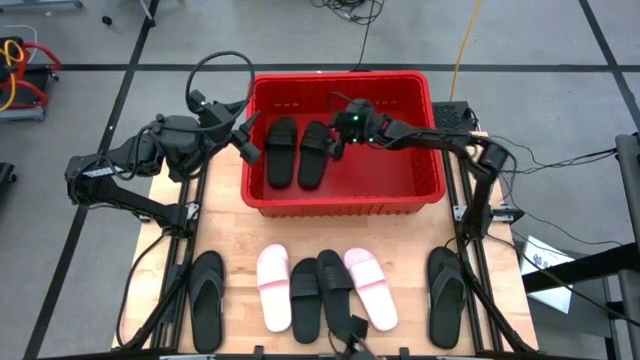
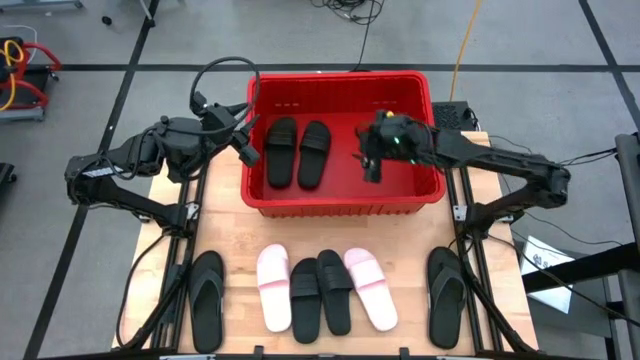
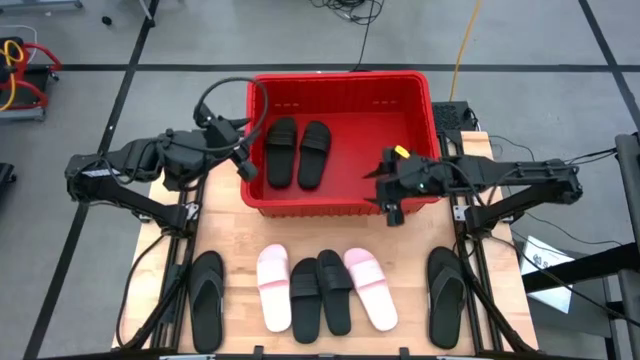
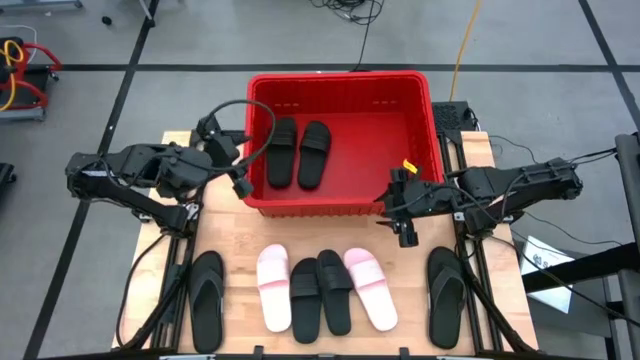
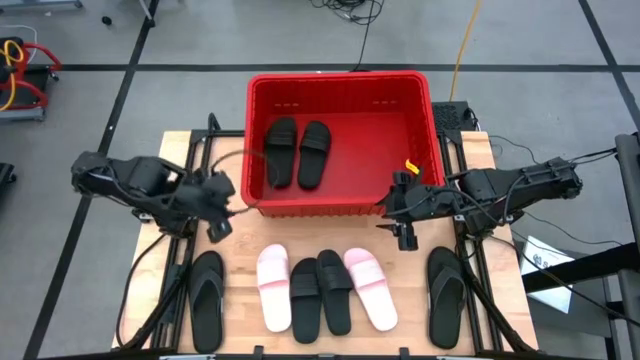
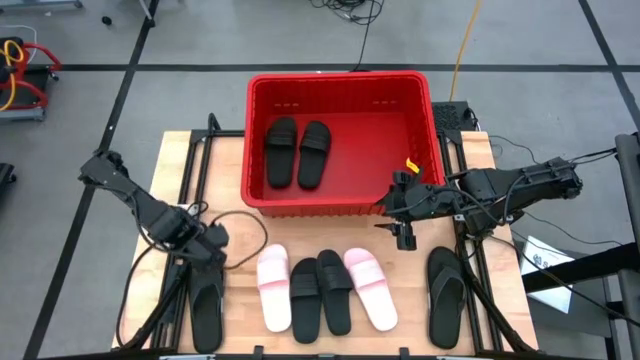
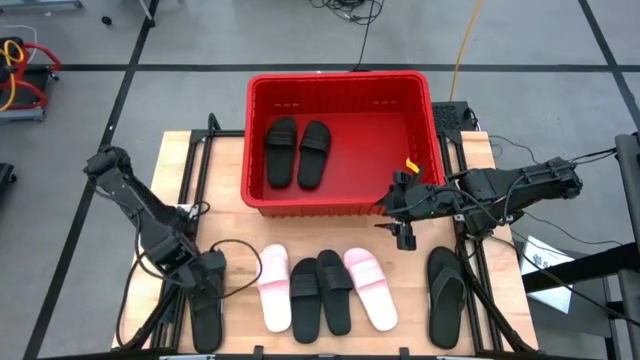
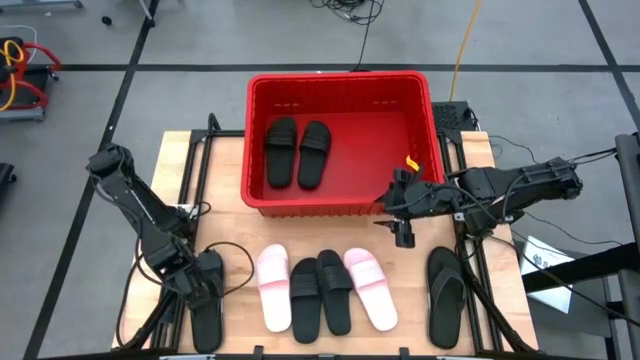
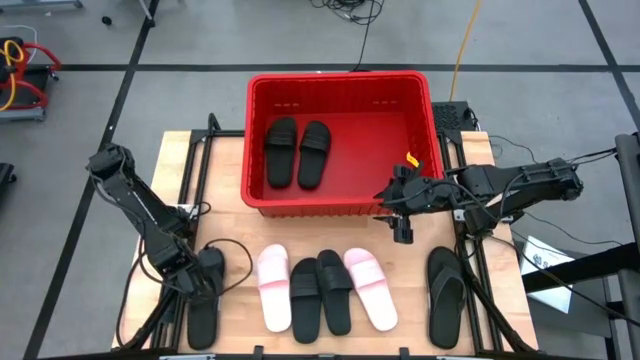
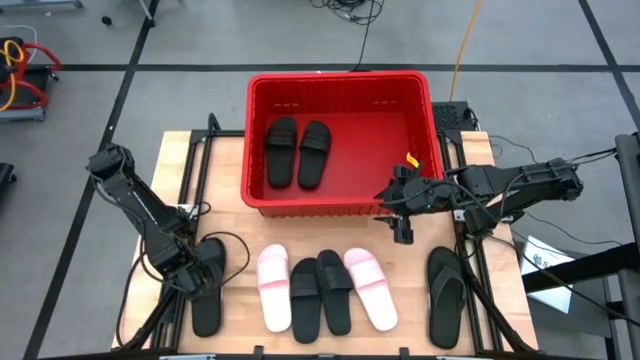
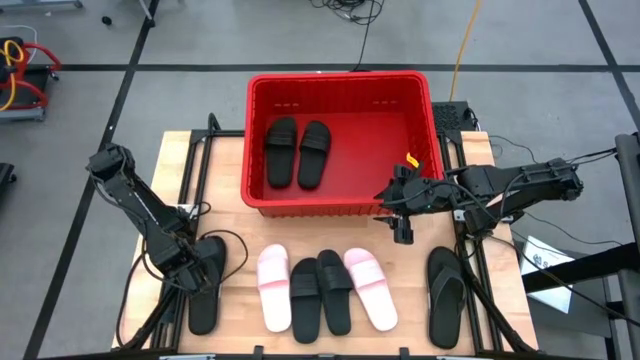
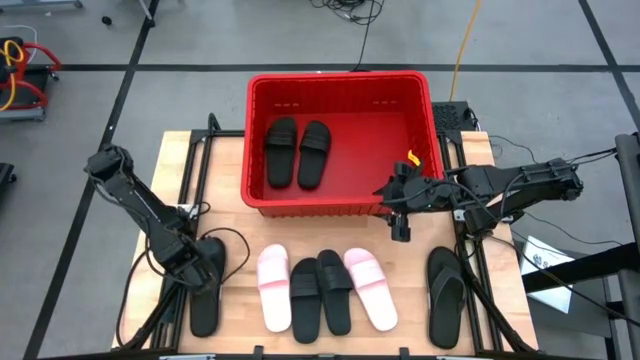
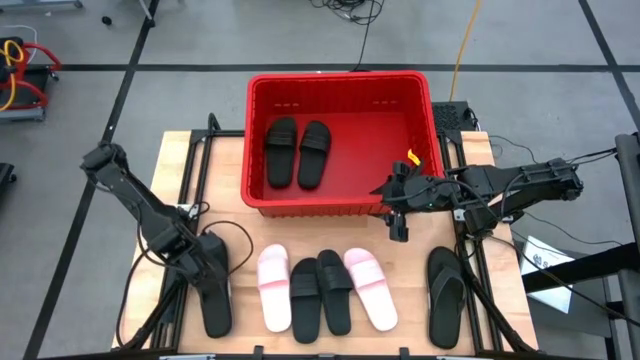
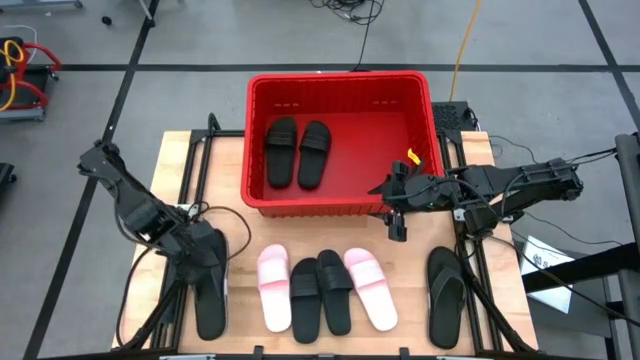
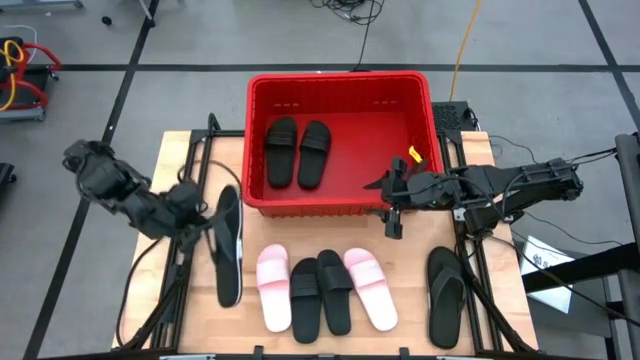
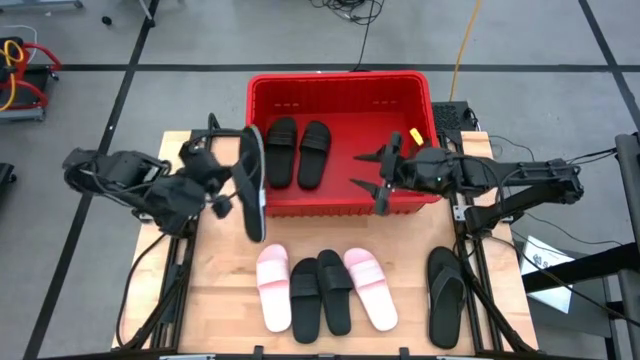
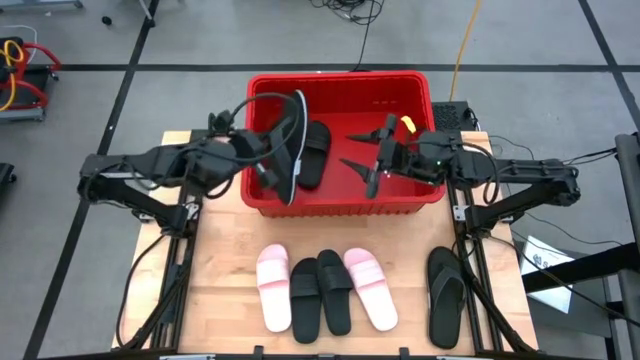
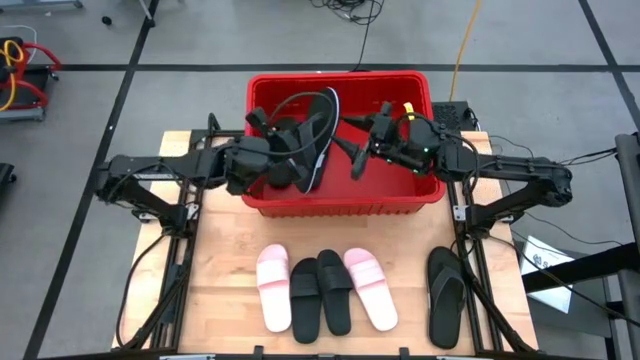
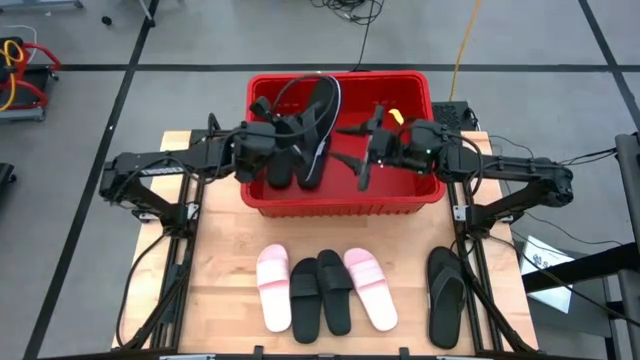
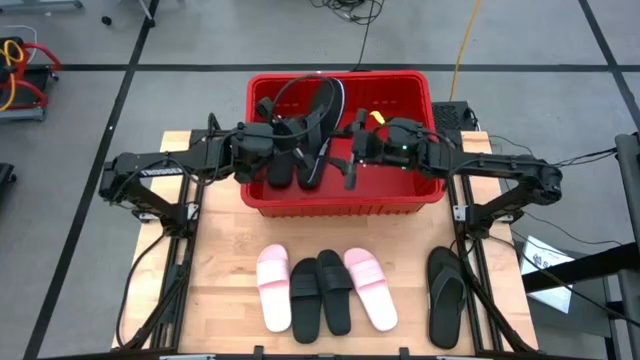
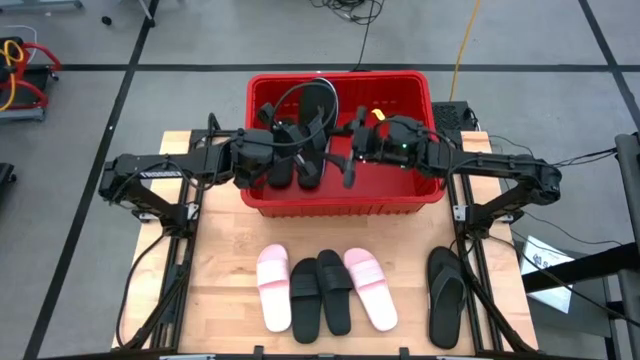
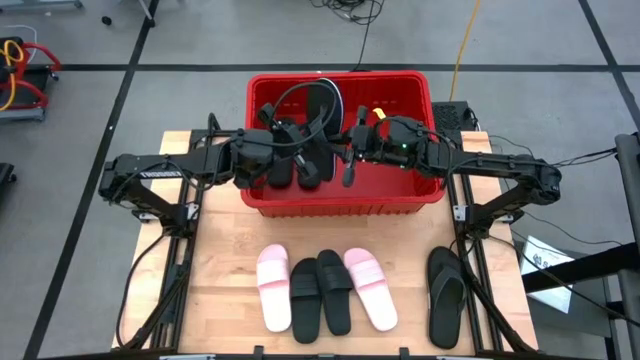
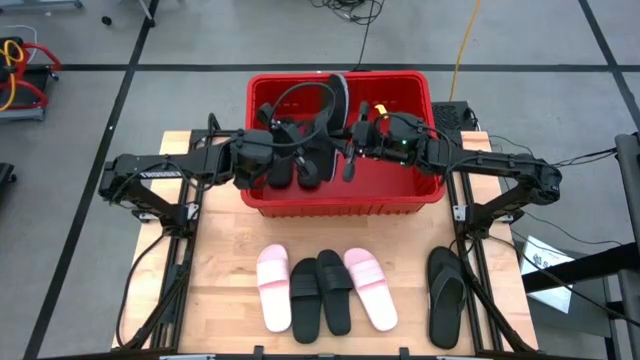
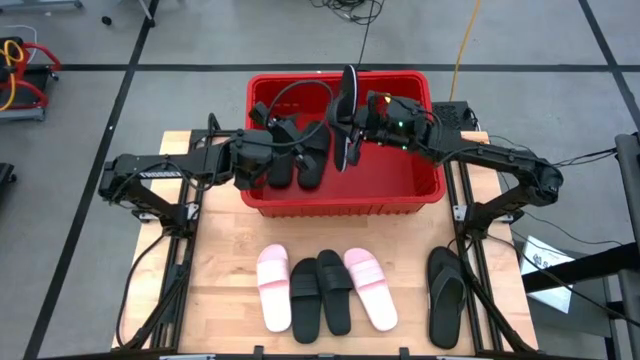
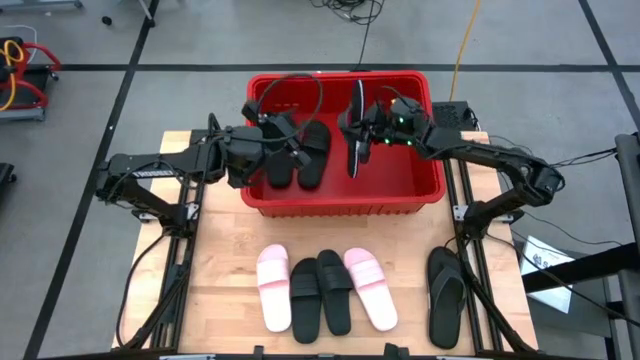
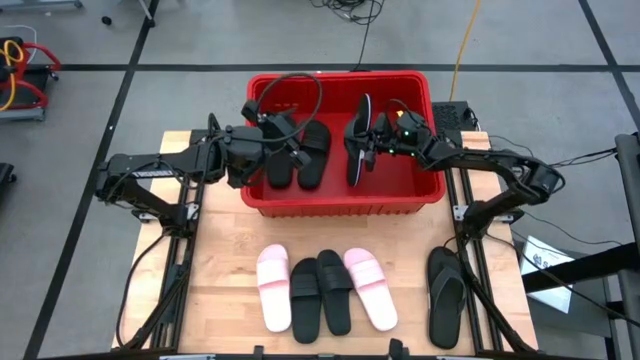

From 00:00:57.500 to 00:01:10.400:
Task: Pick and place slides into bin
Put the black slipper into the red container

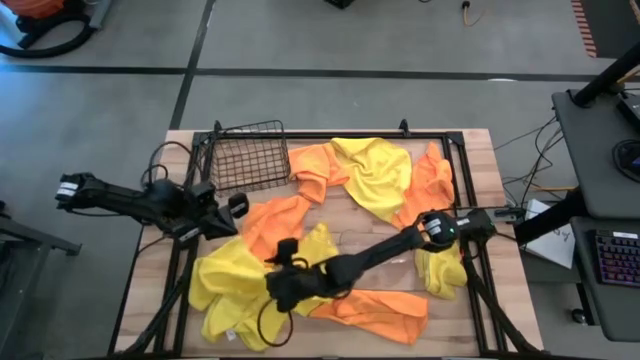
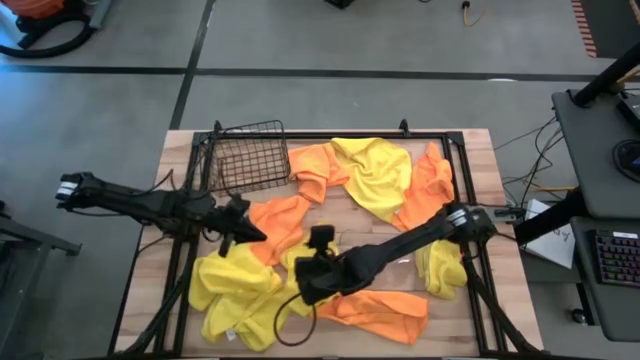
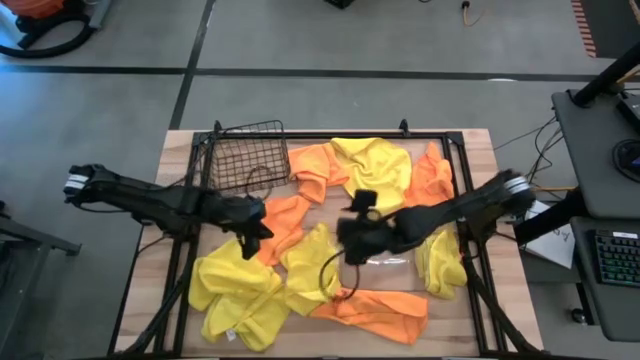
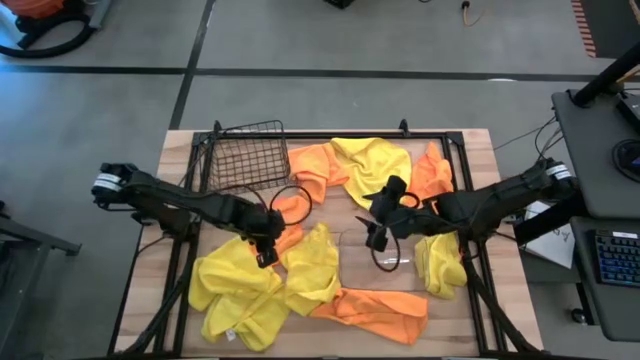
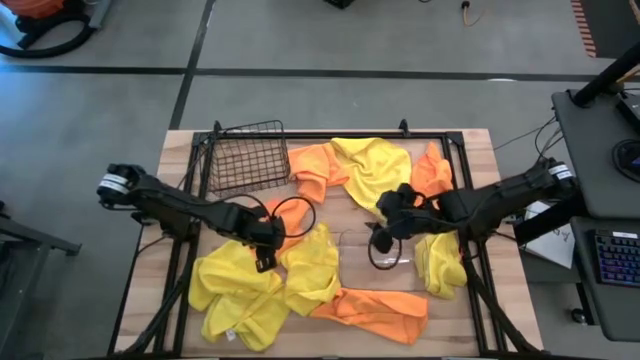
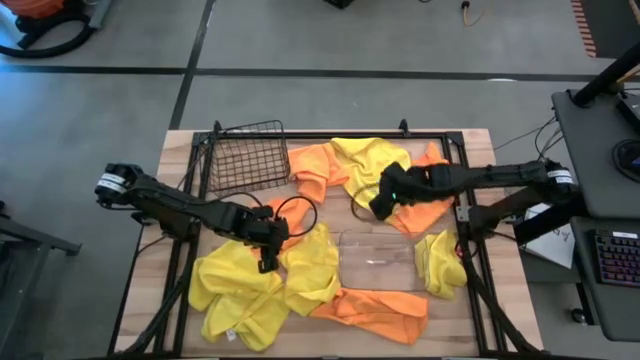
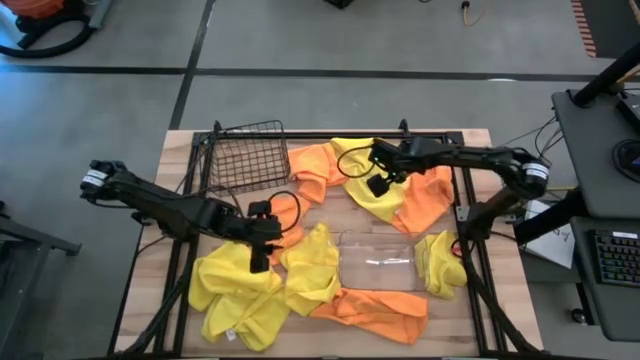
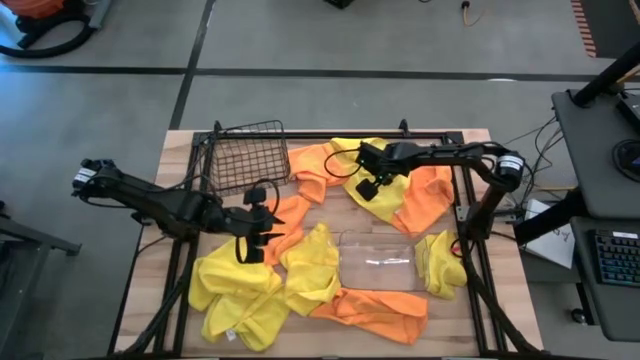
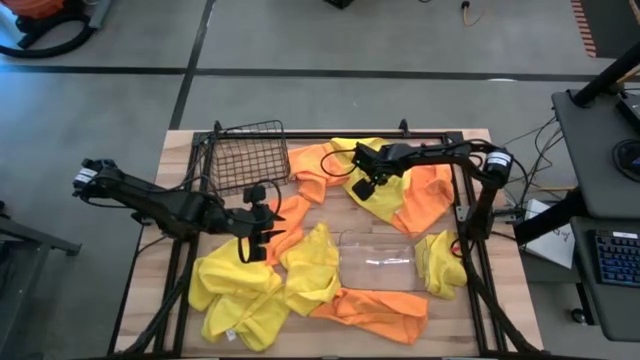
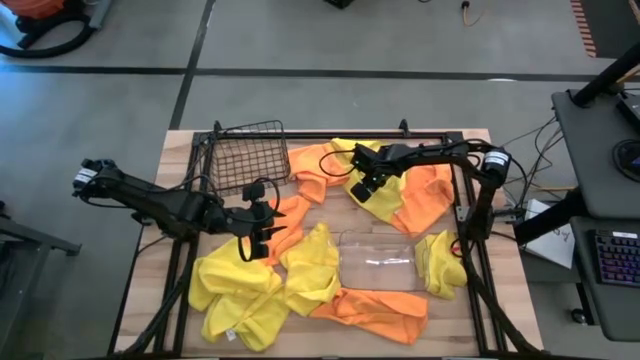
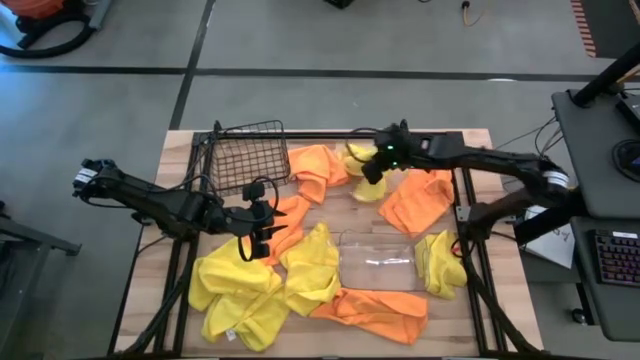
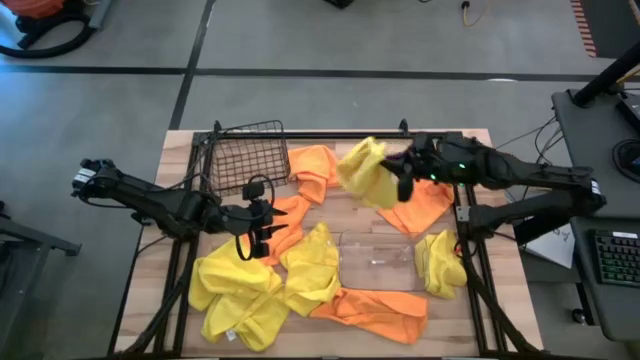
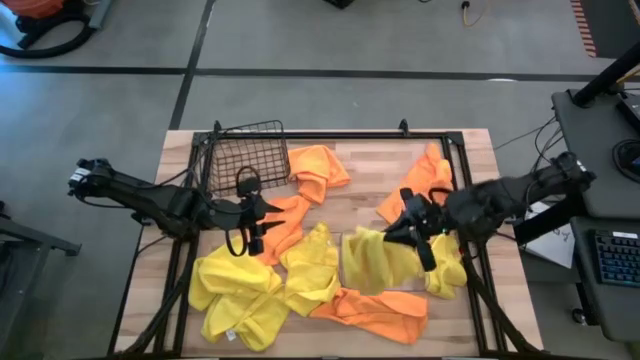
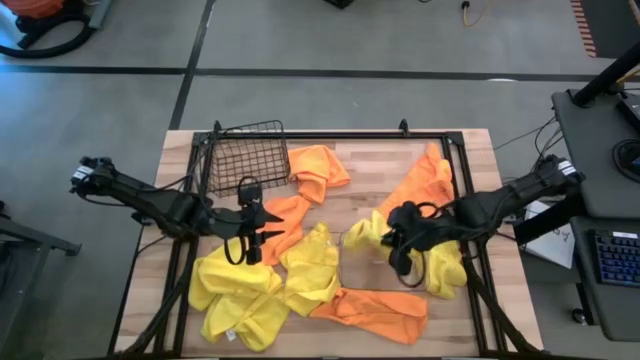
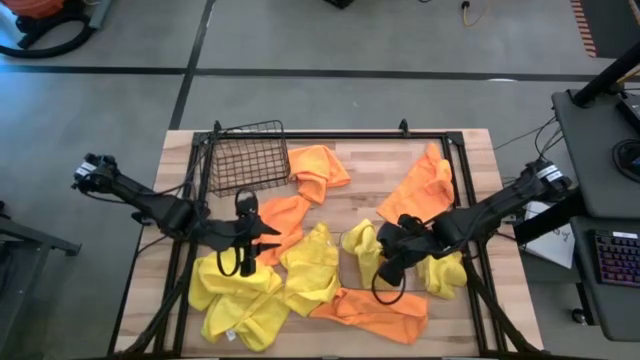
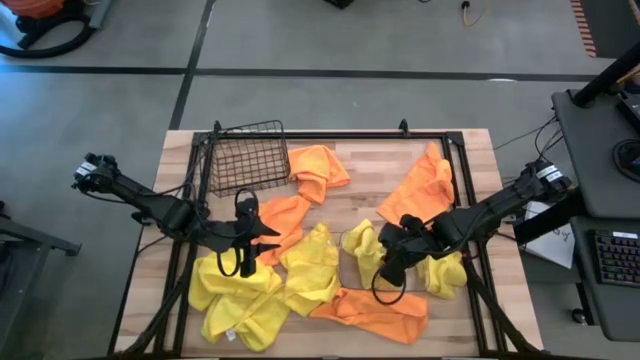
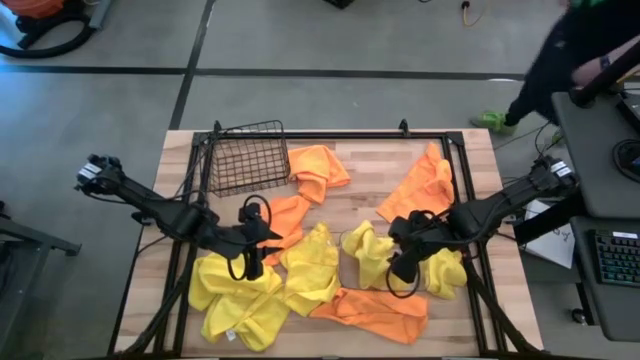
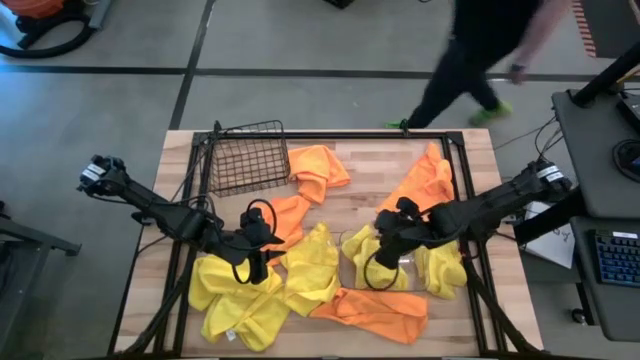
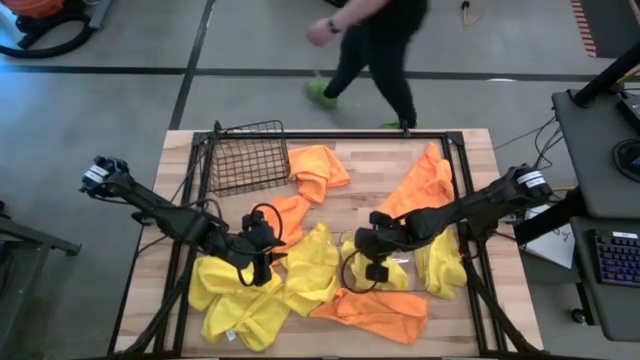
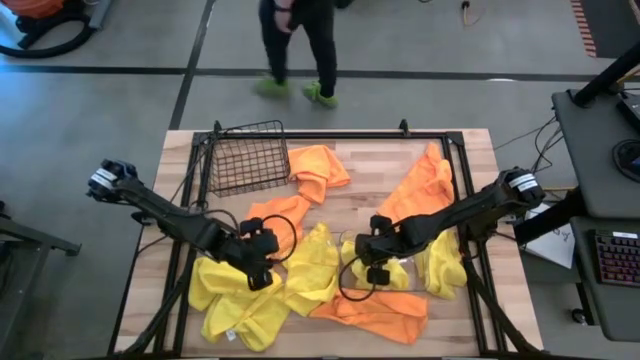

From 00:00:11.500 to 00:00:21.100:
Task: Sort microfiber towel by color & place in baskets
Put the yellow towel into the transparent bin
